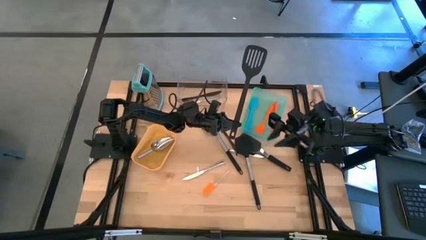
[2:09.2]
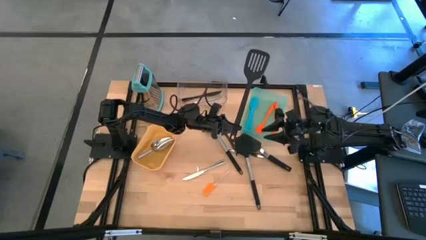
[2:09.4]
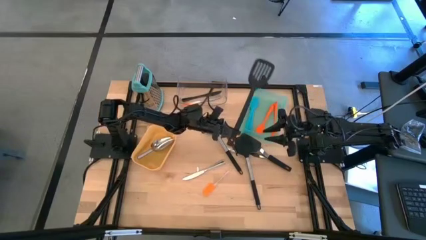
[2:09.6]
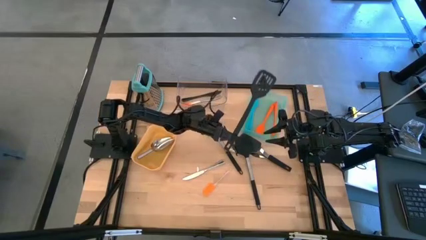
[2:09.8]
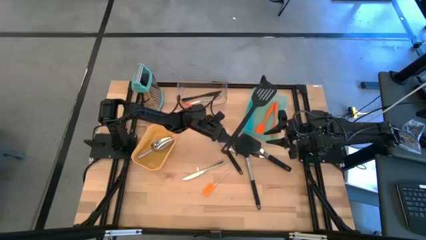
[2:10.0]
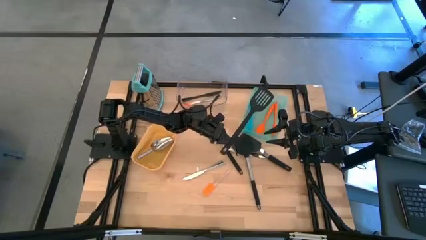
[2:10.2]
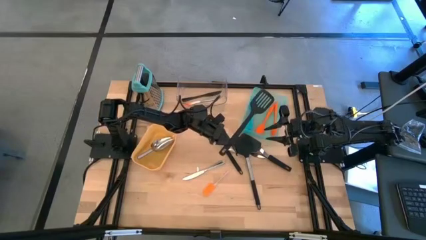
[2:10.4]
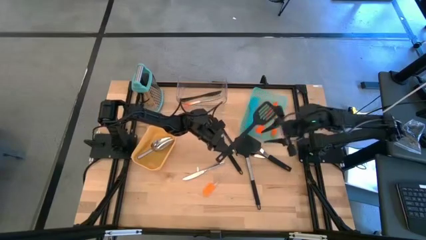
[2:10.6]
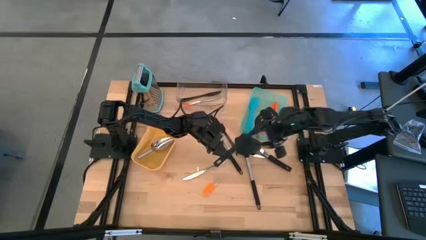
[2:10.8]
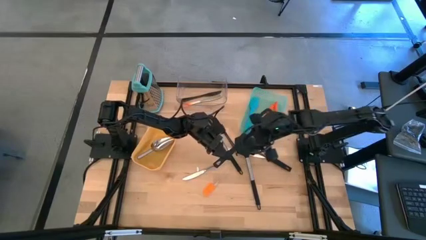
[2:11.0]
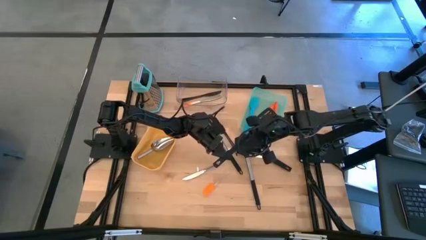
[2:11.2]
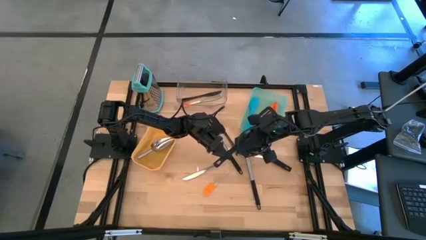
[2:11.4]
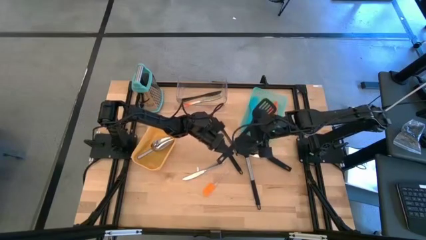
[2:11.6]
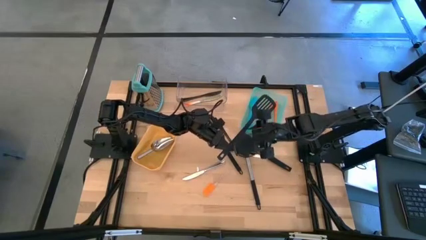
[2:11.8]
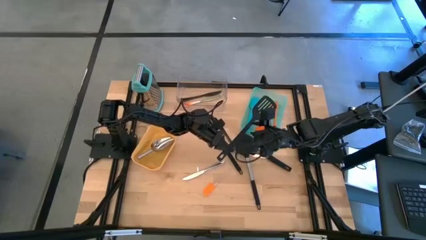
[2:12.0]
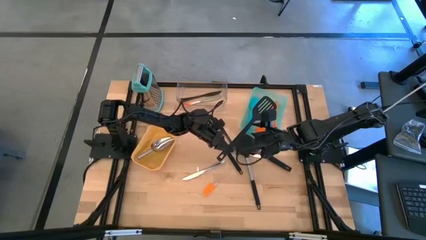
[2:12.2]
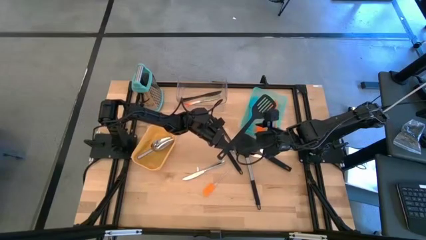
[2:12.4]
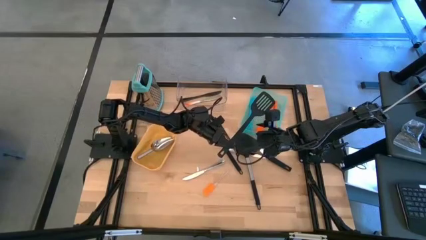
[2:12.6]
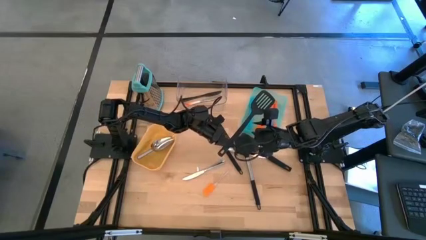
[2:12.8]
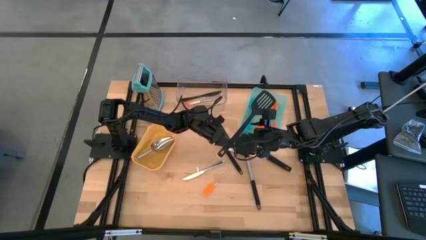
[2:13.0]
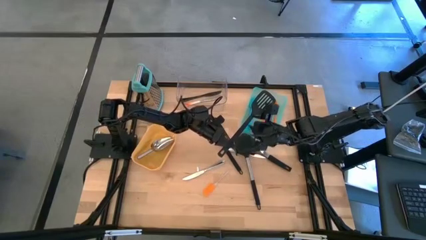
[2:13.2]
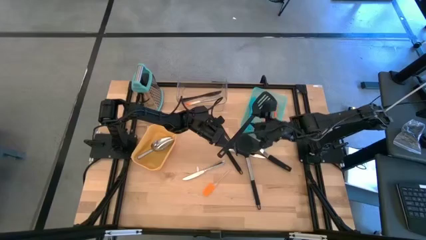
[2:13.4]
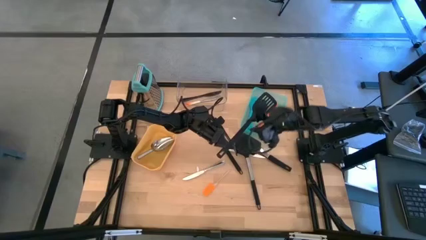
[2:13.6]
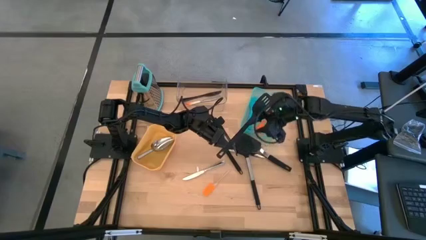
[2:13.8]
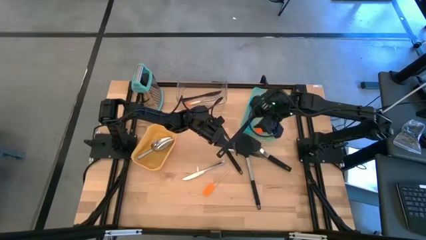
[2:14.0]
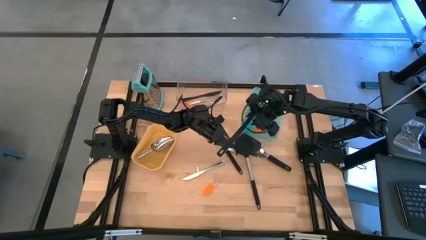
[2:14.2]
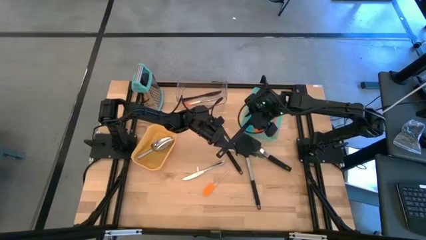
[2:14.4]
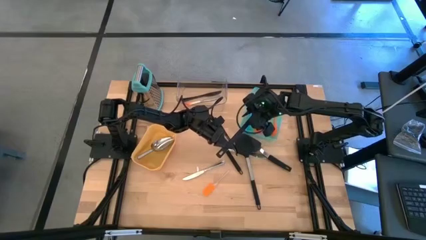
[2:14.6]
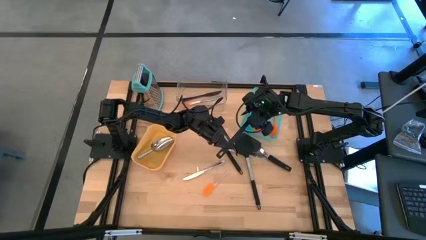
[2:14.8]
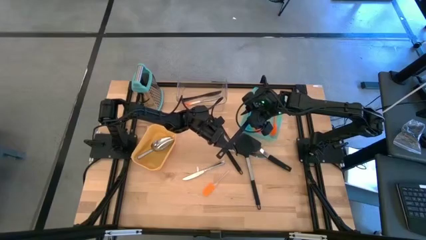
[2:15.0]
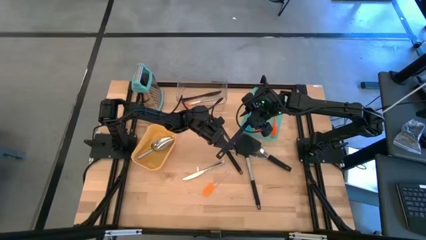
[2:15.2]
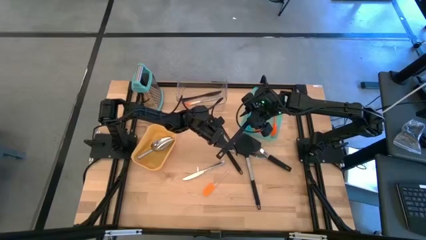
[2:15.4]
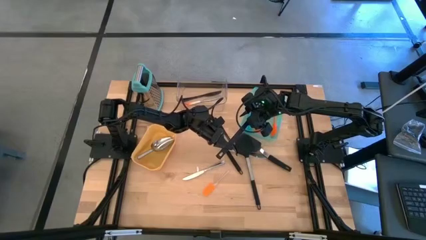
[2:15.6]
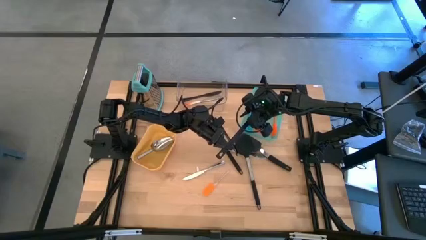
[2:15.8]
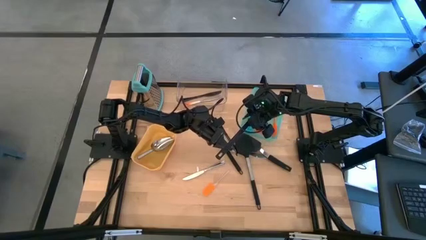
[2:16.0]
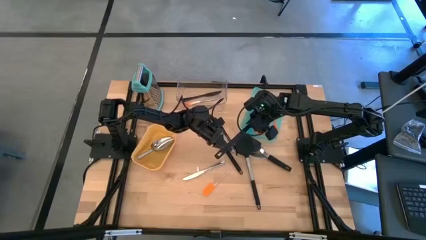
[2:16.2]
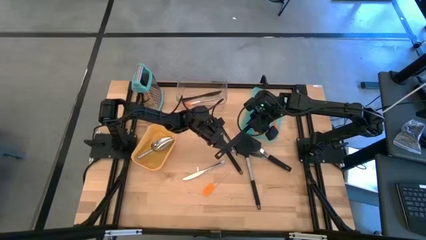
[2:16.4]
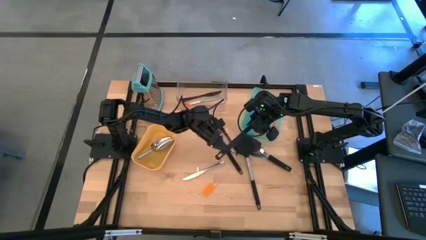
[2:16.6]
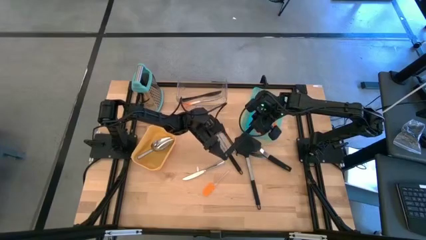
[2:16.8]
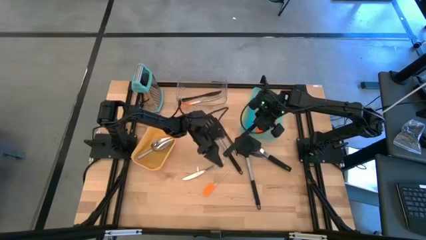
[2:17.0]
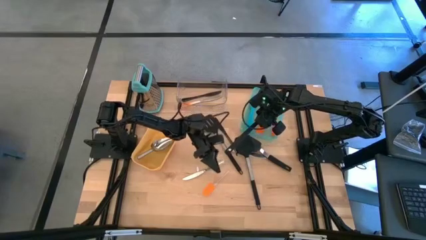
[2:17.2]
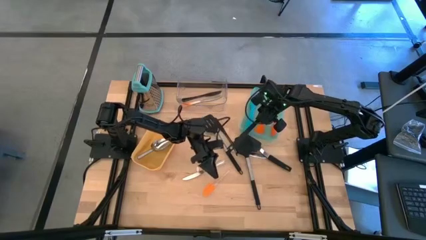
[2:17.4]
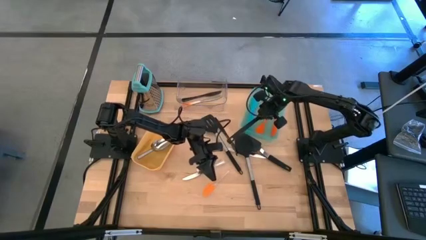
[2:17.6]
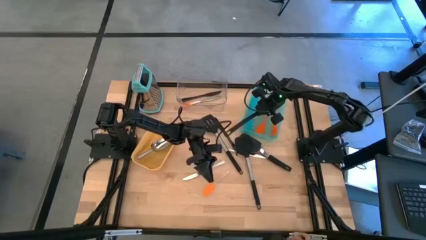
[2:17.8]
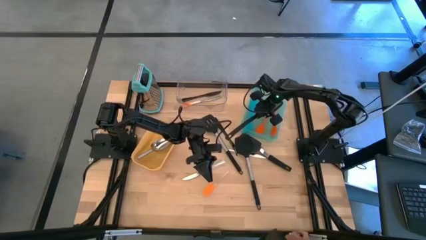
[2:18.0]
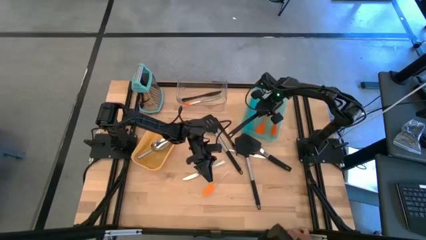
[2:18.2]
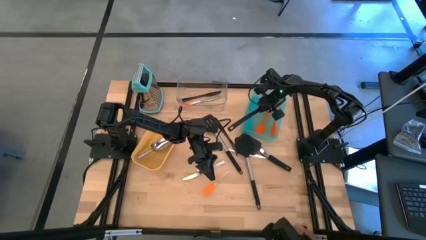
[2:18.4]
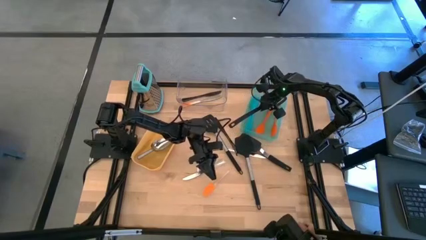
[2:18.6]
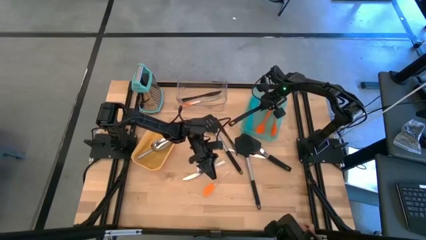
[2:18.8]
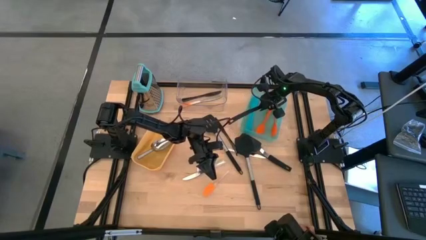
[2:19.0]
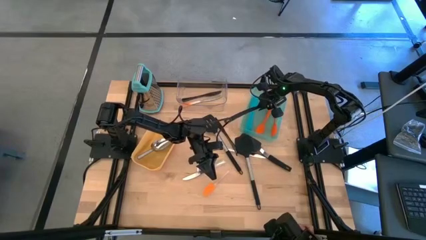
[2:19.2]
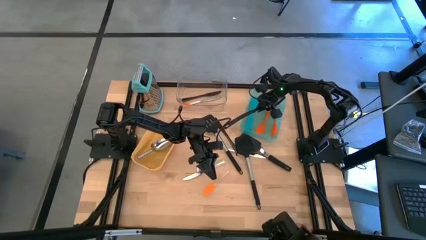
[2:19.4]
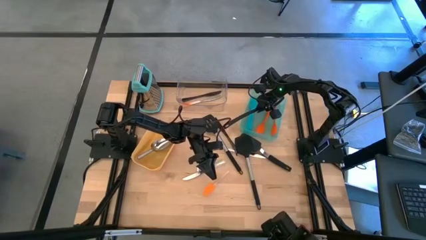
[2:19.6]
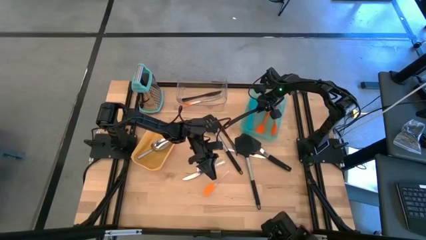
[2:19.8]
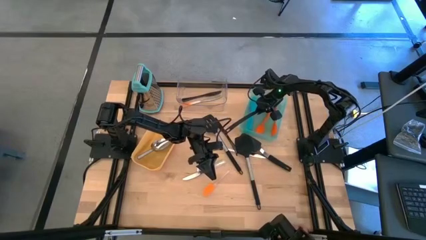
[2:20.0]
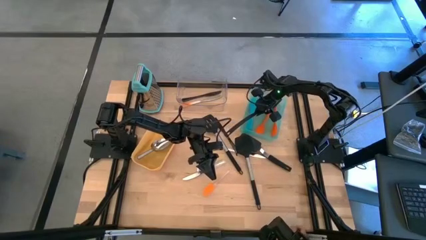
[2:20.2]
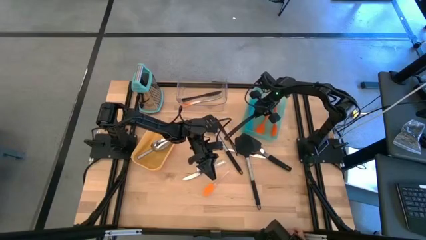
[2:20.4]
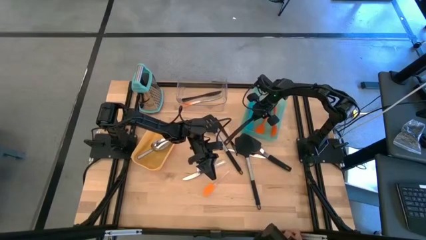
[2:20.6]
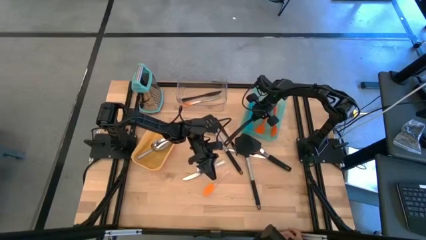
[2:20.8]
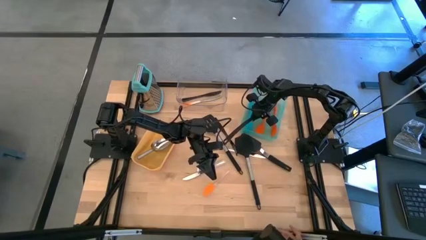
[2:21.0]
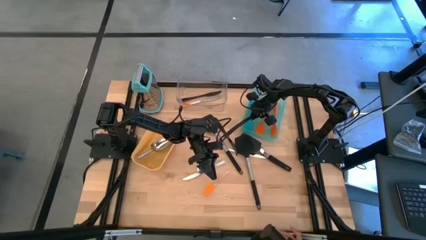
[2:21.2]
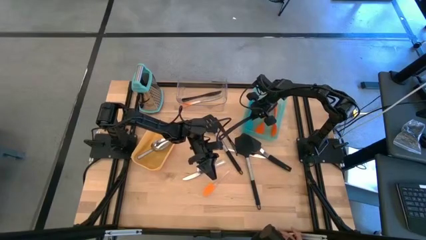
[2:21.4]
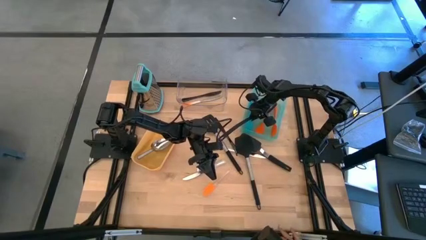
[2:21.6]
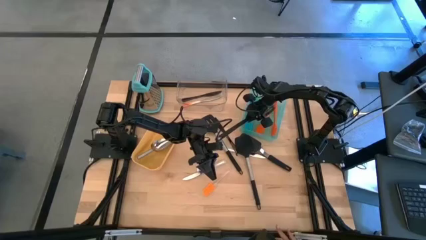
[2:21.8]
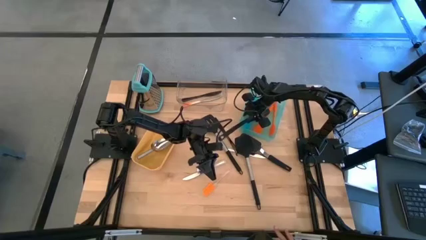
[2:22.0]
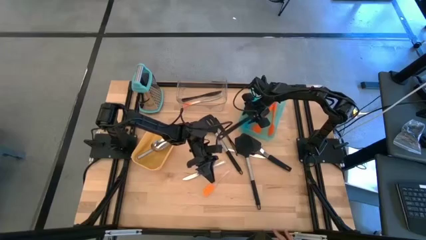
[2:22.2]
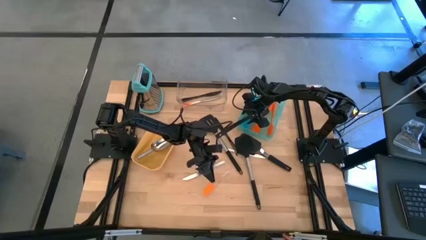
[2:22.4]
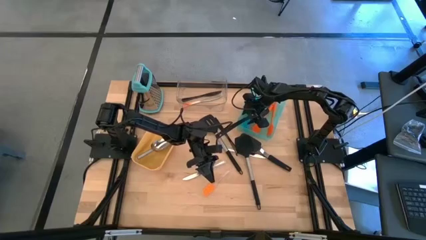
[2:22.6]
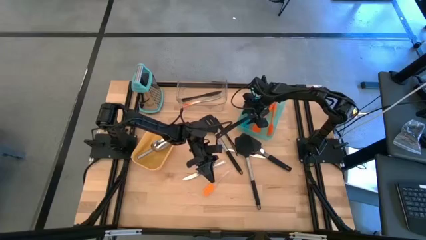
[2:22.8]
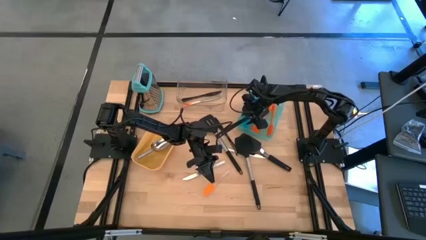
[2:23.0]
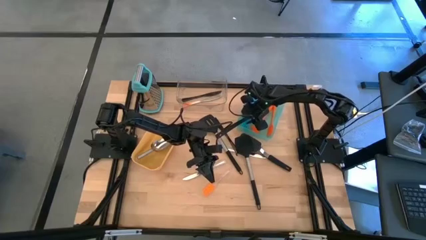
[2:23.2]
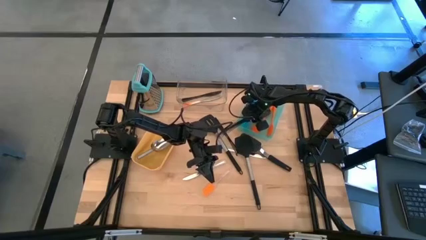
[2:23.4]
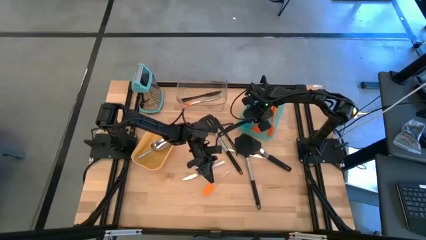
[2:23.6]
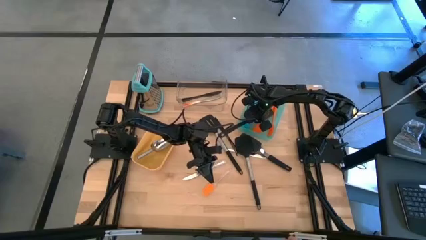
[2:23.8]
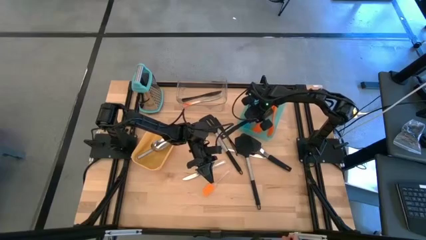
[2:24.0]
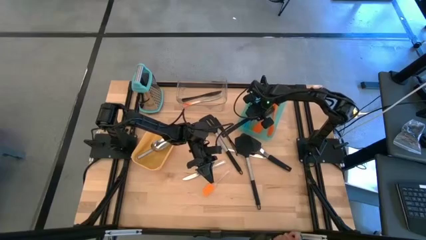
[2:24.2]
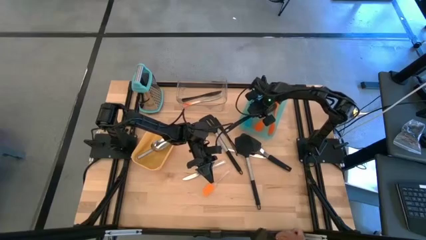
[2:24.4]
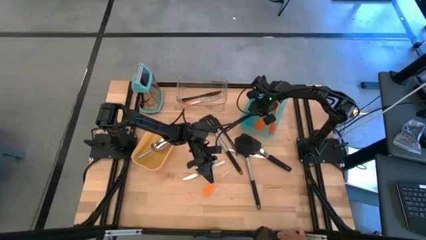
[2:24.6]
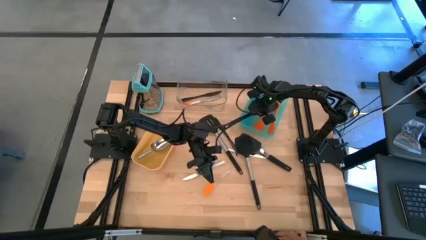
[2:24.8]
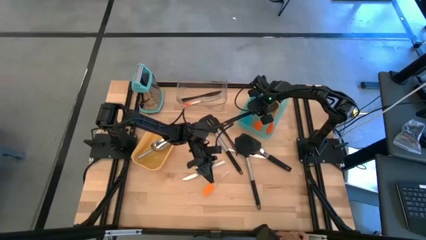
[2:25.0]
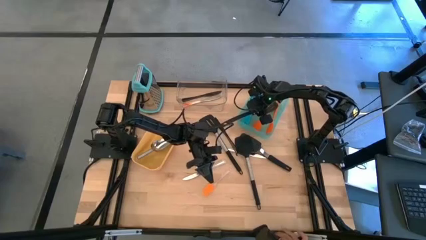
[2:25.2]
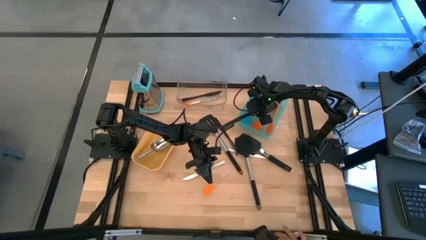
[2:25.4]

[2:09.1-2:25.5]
Task: Pick & Place Kitchen Items
Put the black slotted spatula into the green bin
